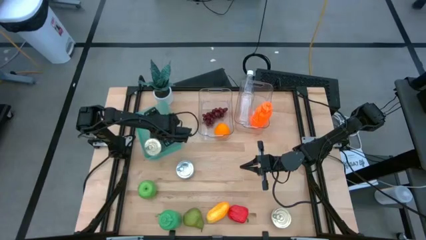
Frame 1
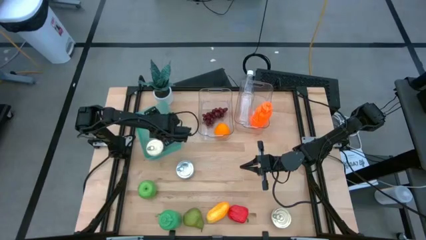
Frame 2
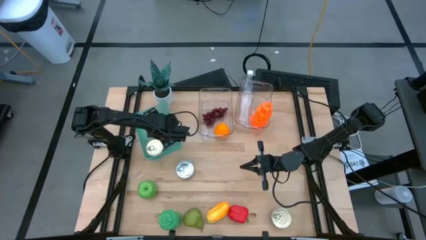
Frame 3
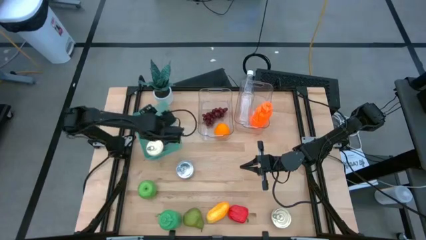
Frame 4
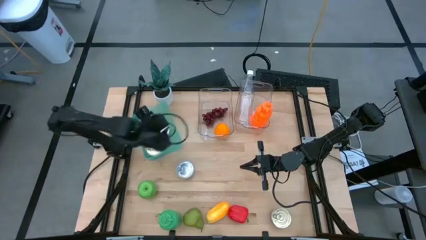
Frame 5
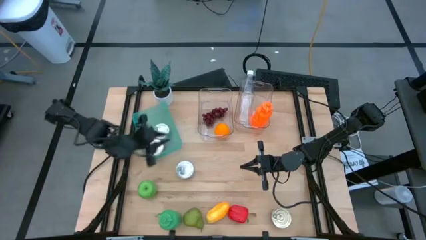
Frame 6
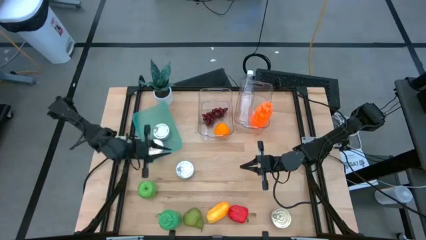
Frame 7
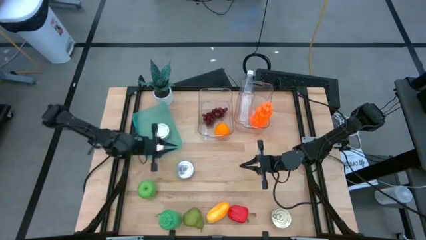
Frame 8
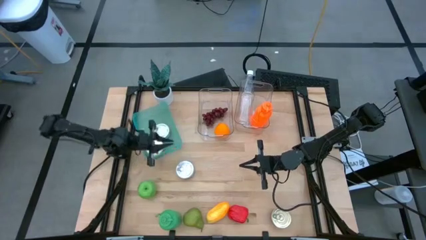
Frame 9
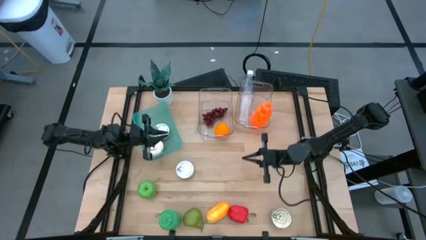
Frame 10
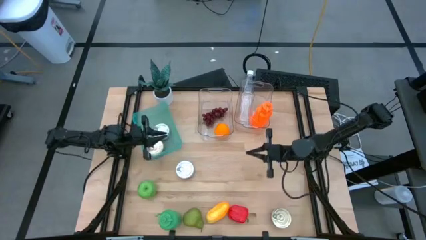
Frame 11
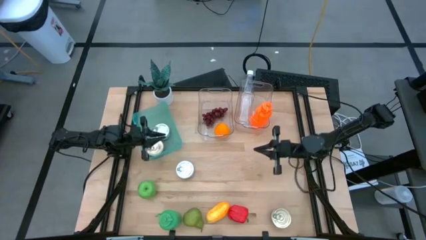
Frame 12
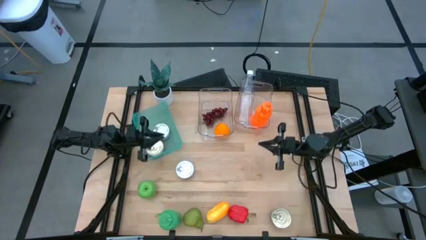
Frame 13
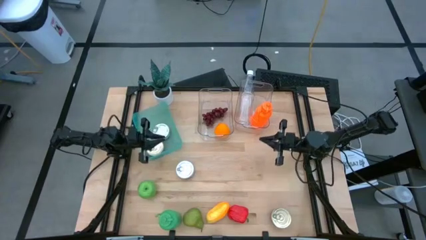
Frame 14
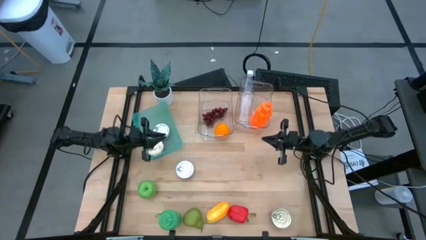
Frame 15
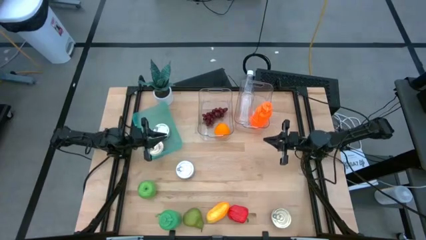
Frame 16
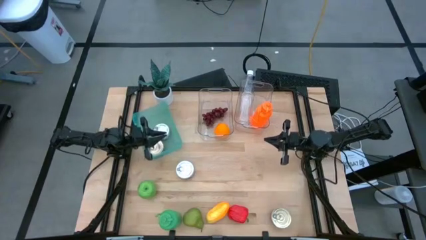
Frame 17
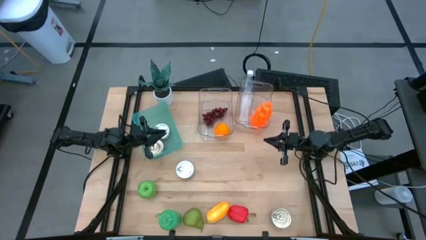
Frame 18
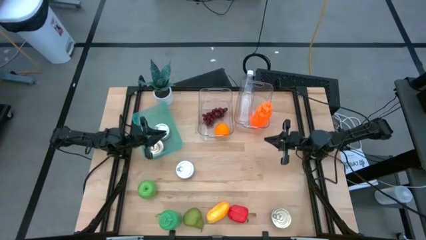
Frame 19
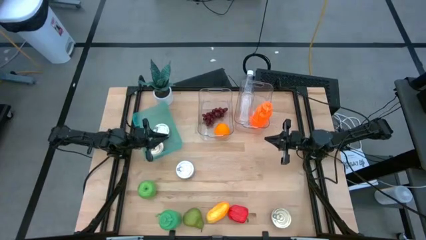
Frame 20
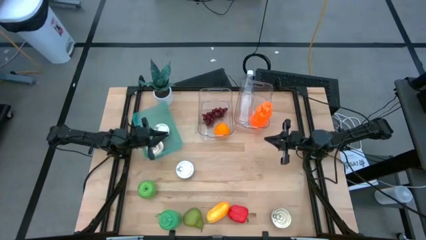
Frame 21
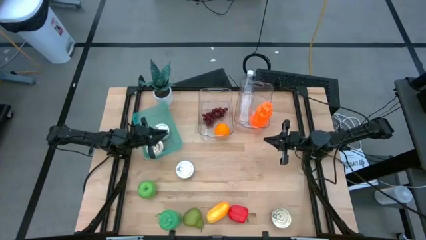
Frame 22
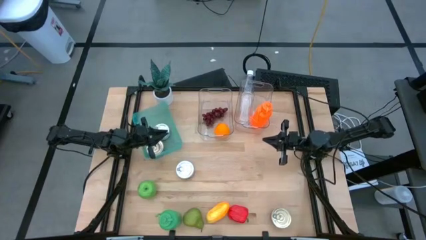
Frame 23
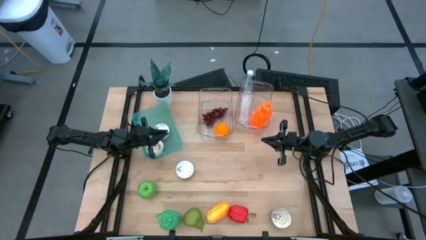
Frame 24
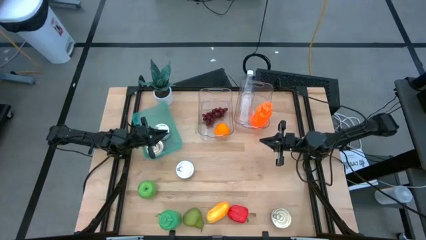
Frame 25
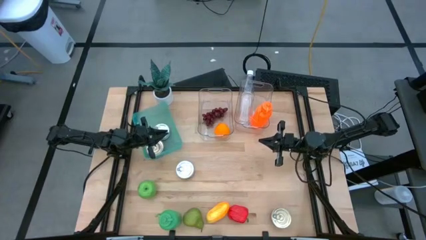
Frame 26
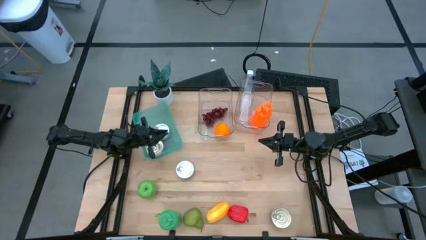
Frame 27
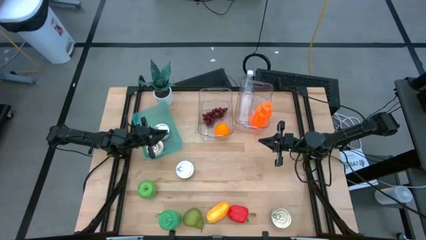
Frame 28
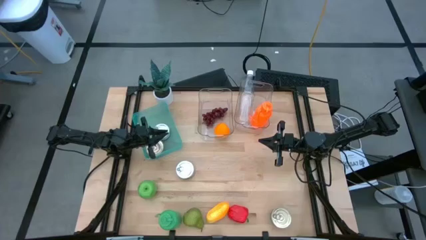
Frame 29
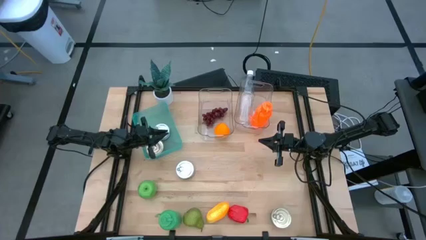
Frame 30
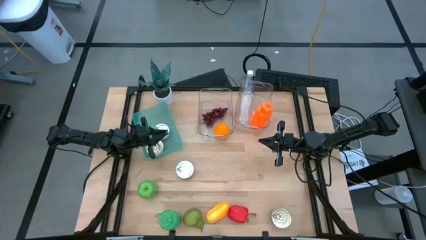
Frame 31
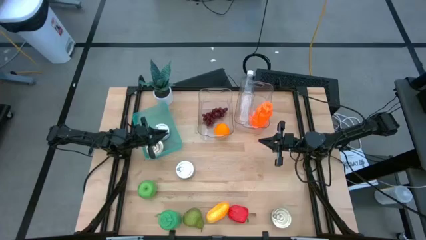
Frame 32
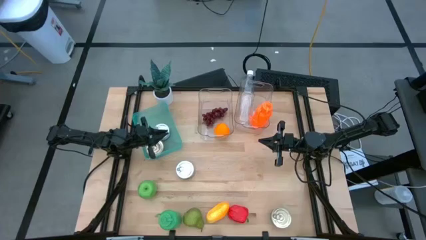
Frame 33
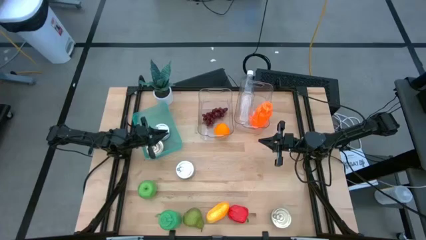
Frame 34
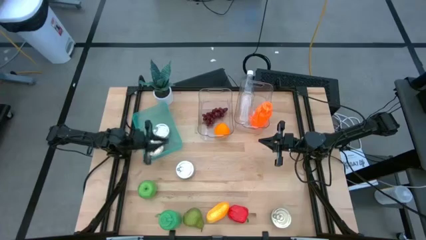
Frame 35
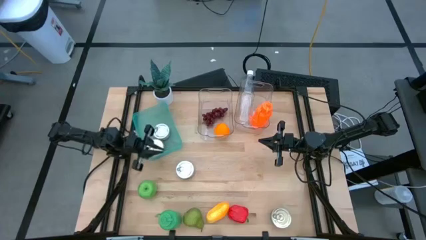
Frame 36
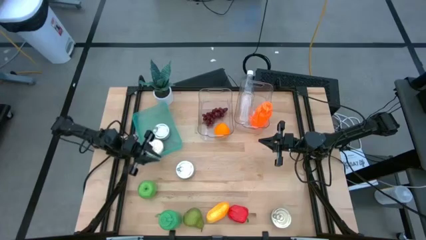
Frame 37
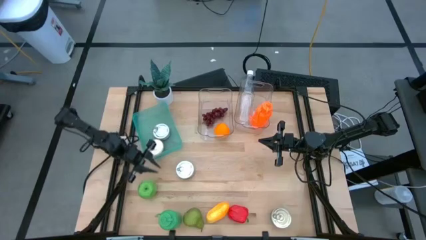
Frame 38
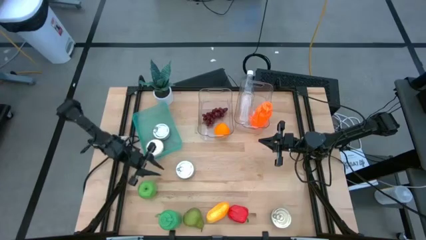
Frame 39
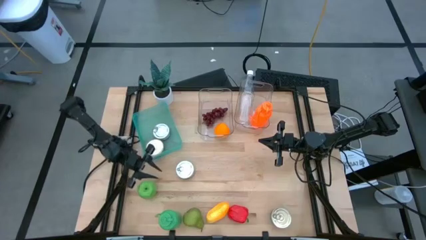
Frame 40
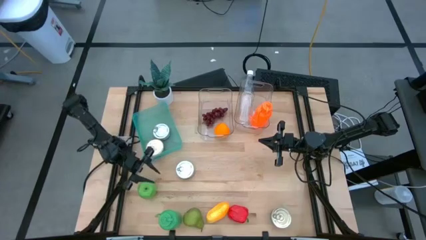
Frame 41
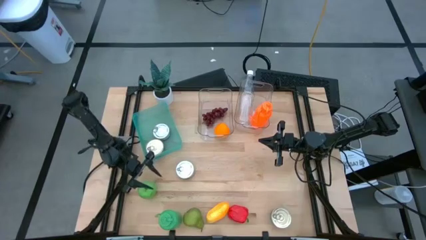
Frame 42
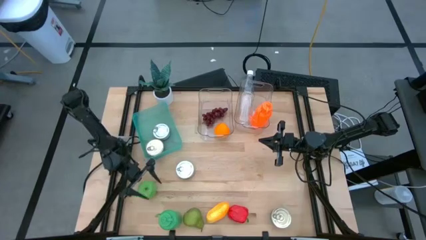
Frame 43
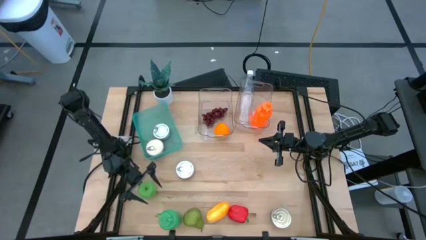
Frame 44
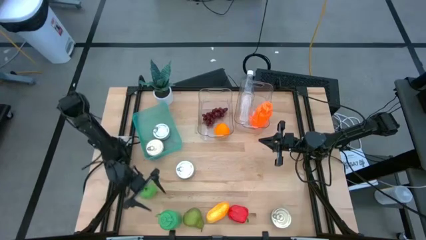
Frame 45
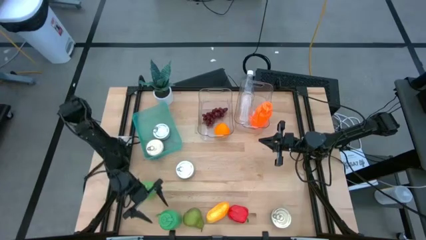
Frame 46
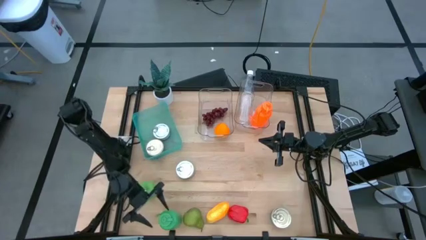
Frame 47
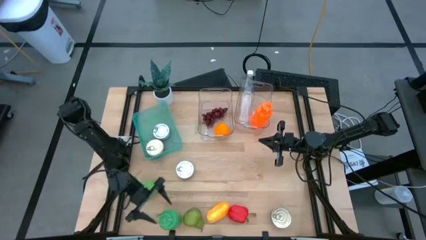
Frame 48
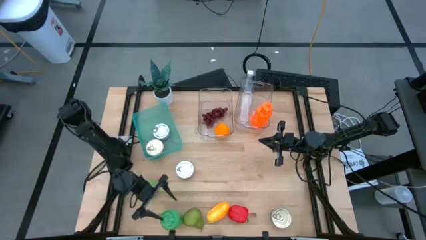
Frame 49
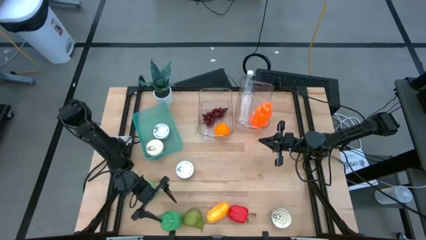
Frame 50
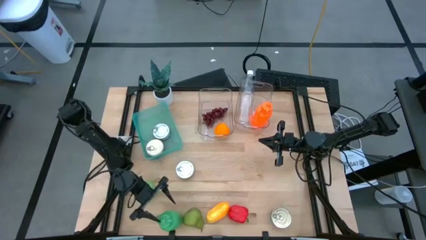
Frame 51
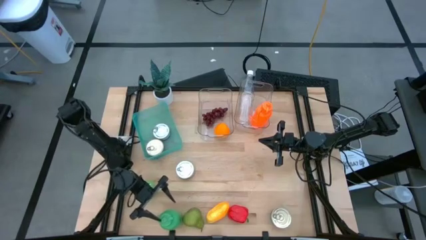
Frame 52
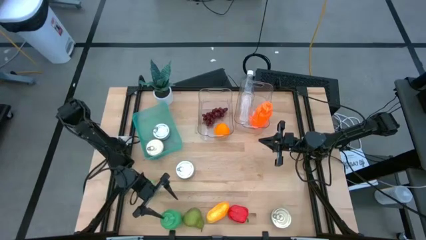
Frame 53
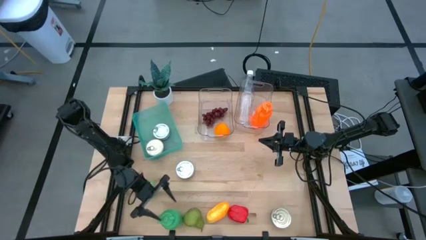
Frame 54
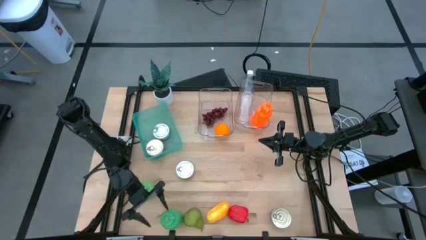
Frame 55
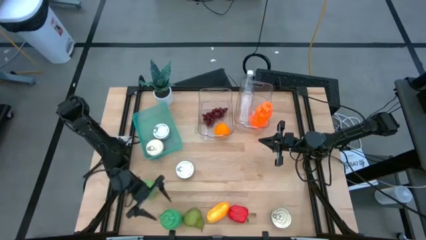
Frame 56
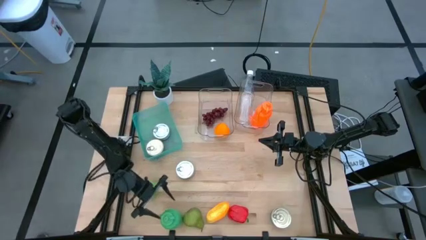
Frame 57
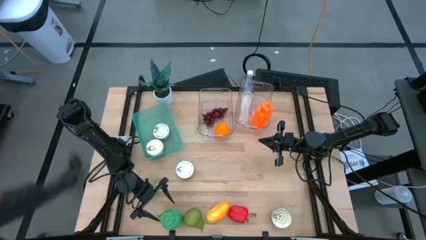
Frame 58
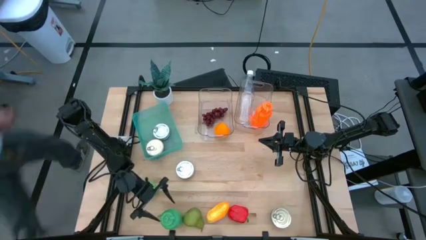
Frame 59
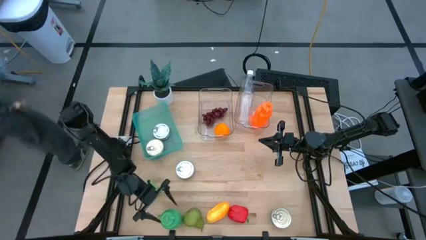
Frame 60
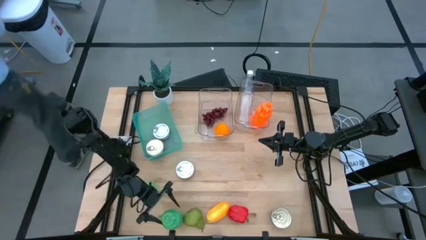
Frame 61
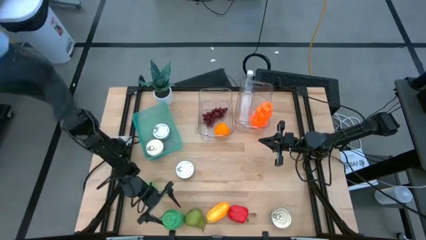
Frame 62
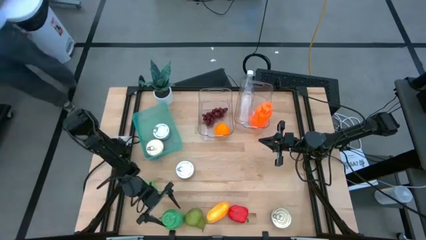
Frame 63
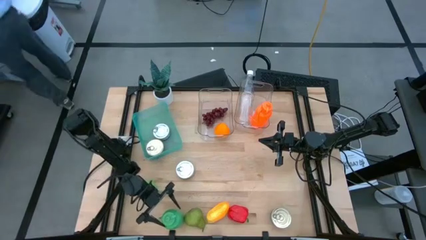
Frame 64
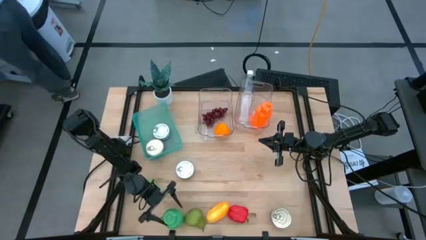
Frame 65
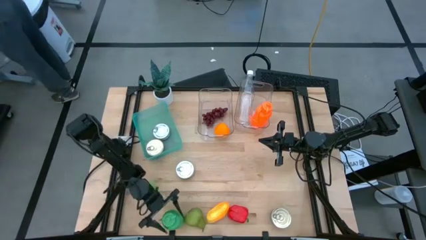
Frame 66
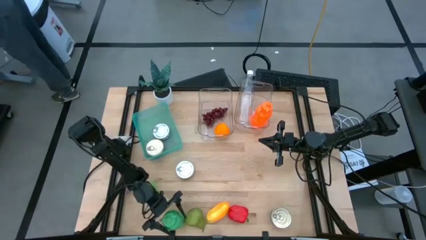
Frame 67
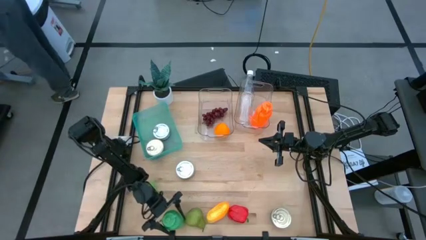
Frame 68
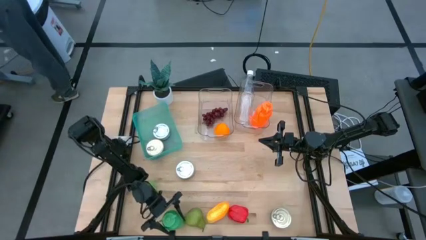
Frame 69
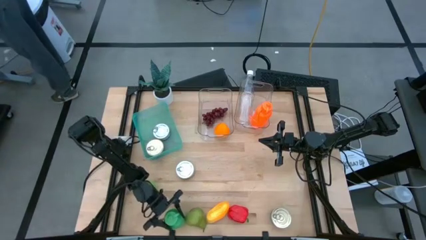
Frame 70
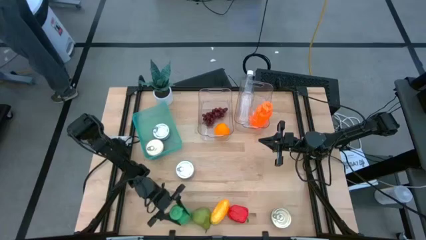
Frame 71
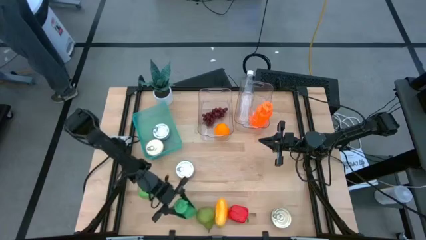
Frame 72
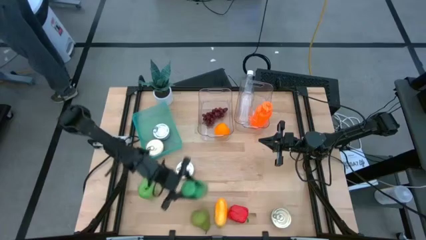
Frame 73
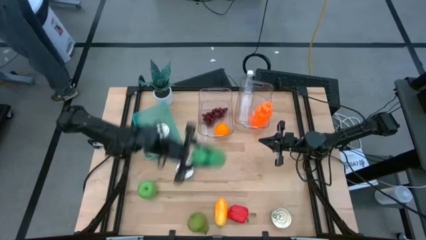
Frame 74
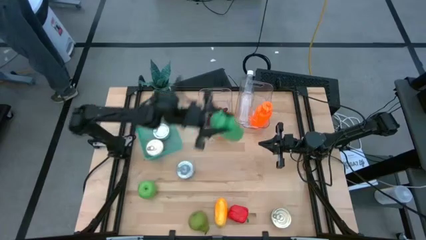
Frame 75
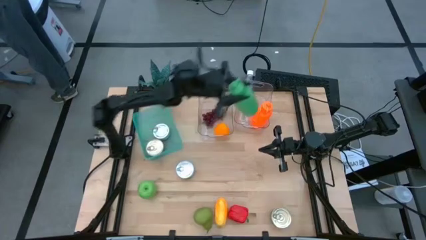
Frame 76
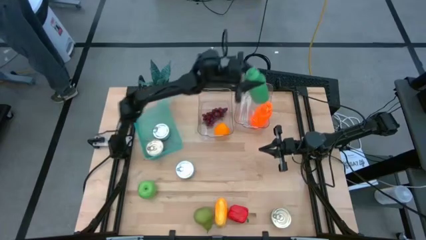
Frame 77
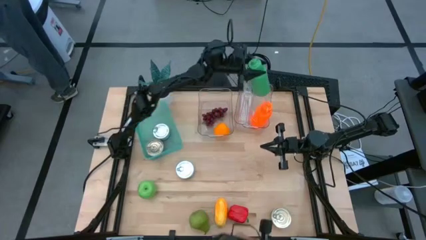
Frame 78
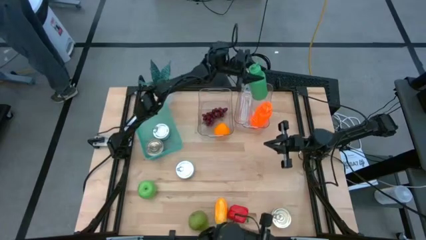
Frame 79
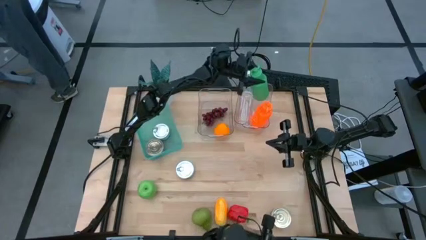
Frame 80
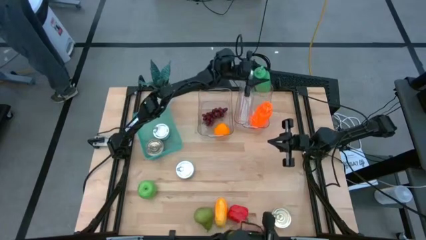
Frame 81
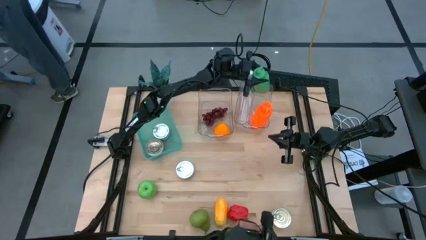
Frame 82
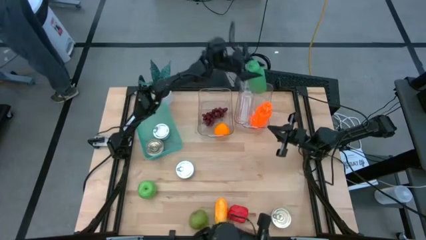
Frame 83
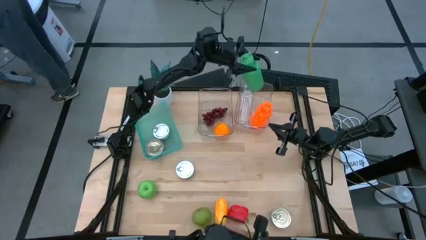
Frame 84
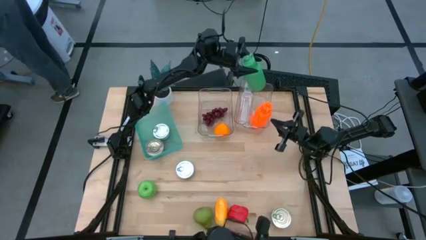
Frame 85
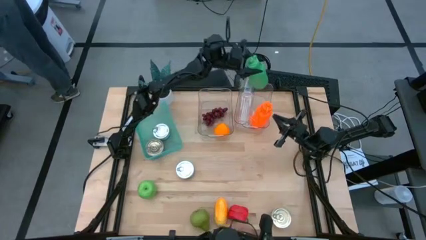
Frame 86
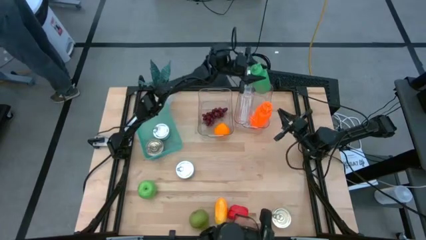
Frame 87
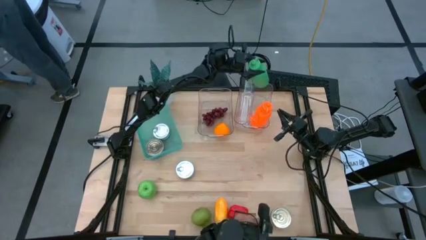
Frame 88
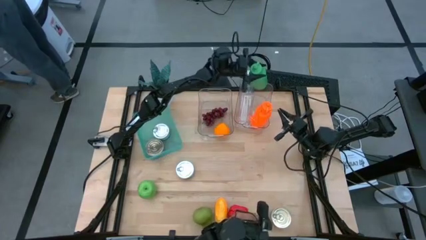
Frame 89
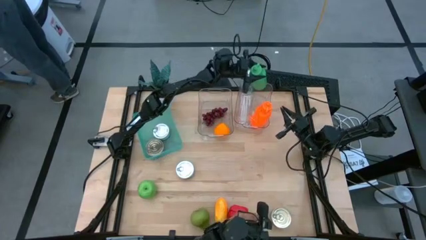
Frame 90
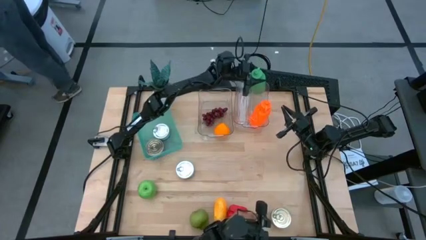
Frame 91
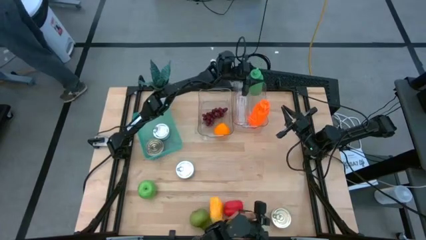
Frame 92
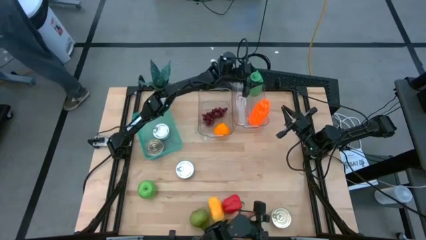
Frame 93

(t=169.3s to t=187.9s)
Task: Pick & Place Food Item
Put the green water bottle into the right transparent bin
